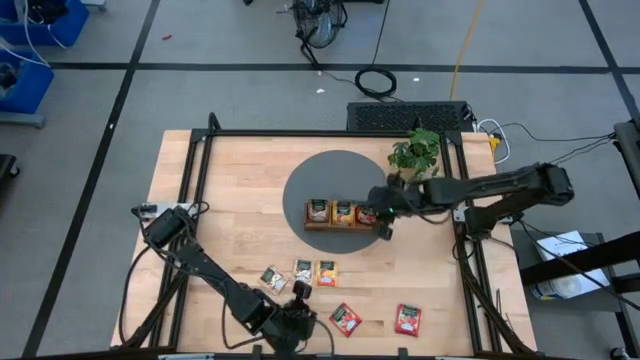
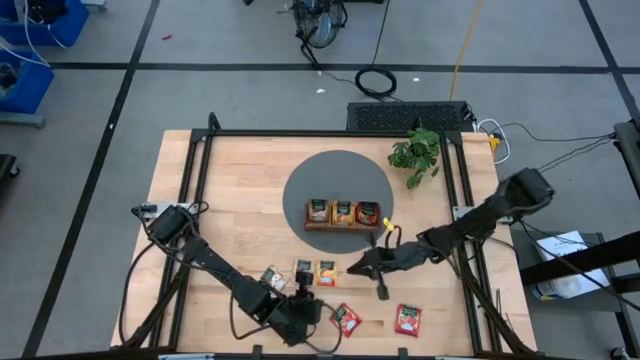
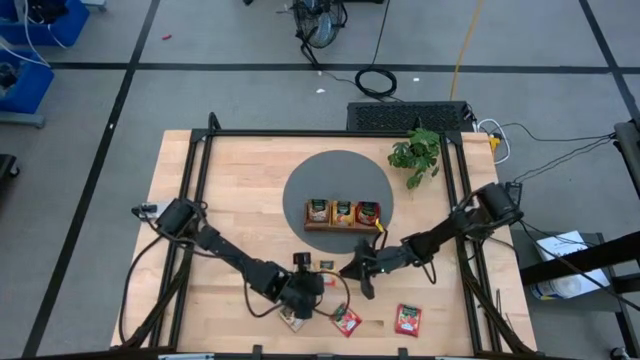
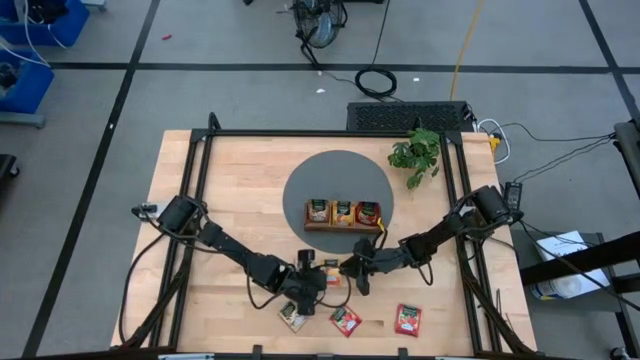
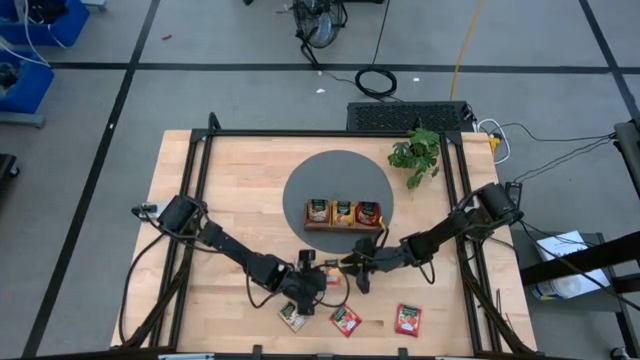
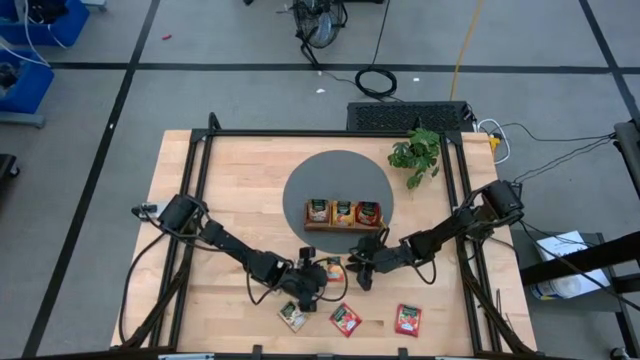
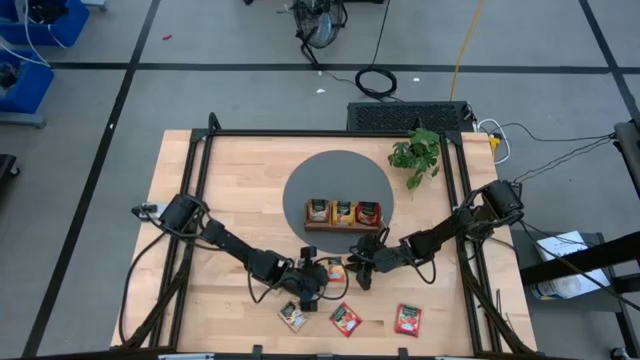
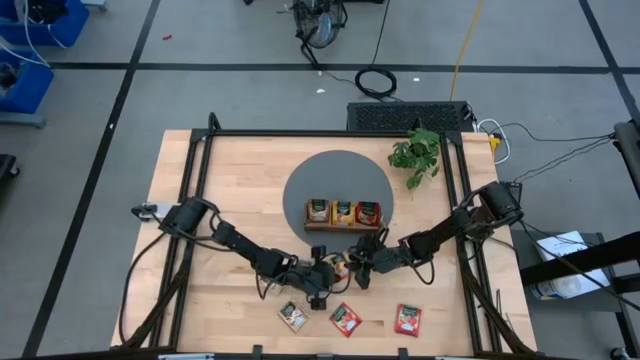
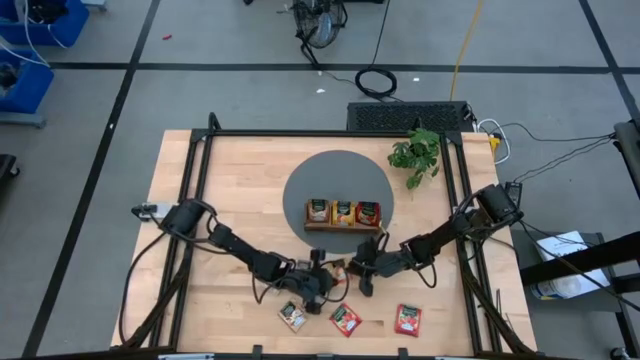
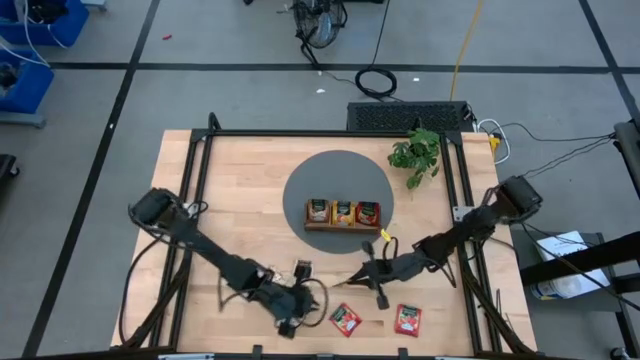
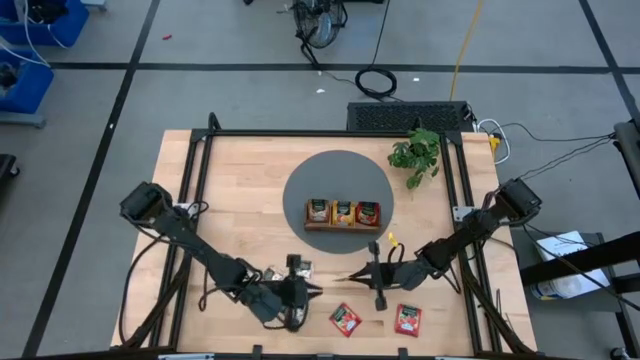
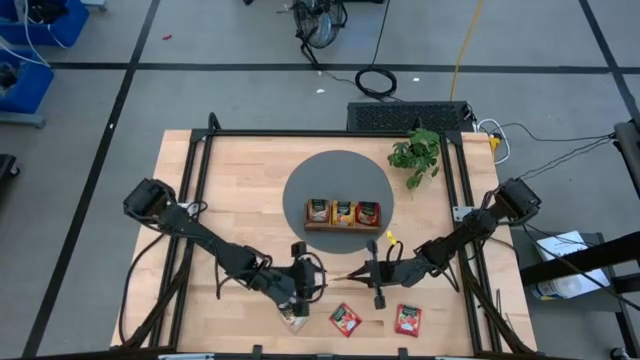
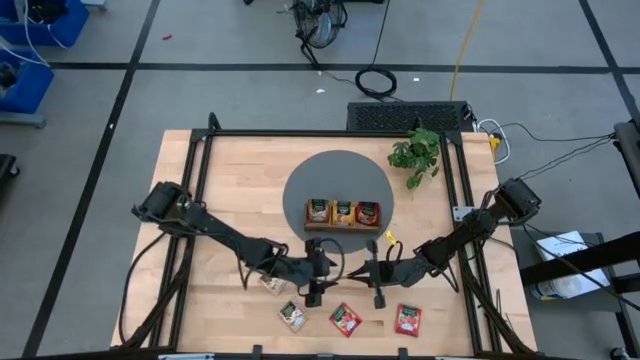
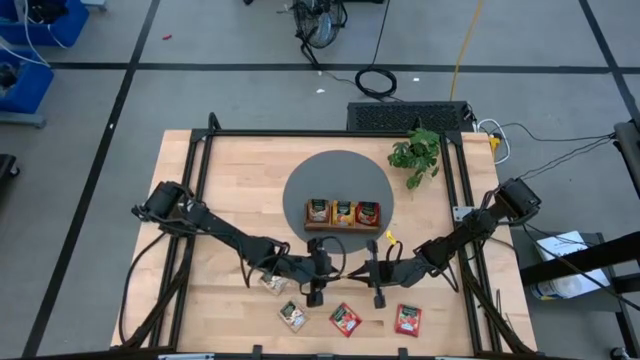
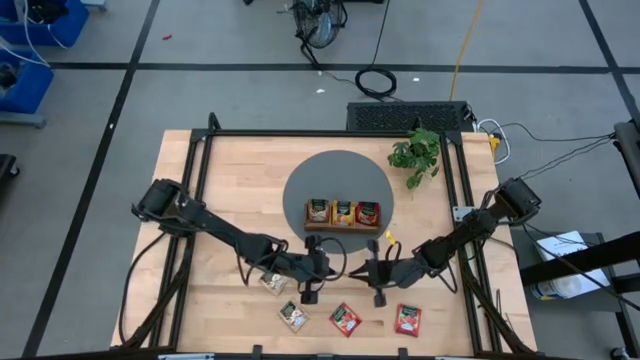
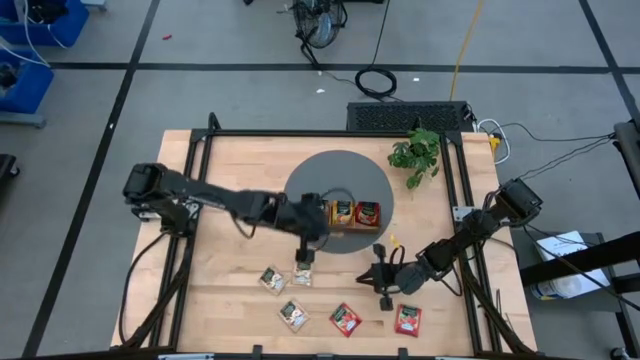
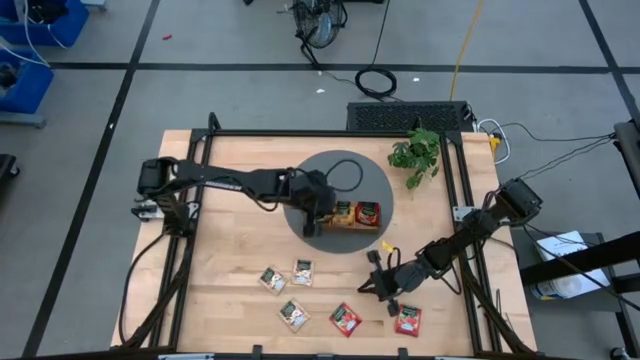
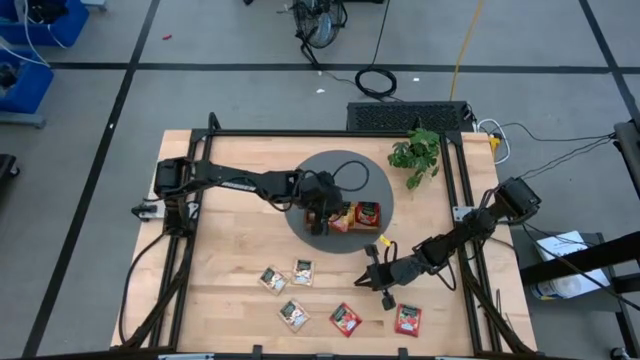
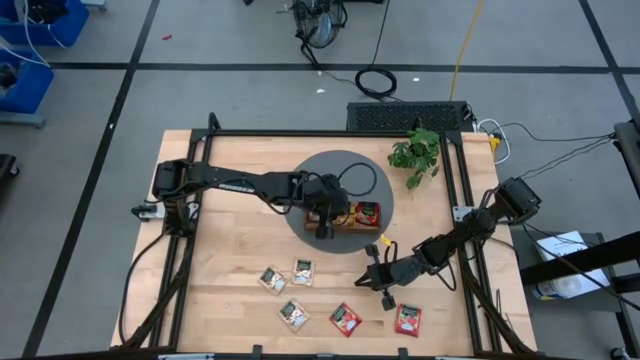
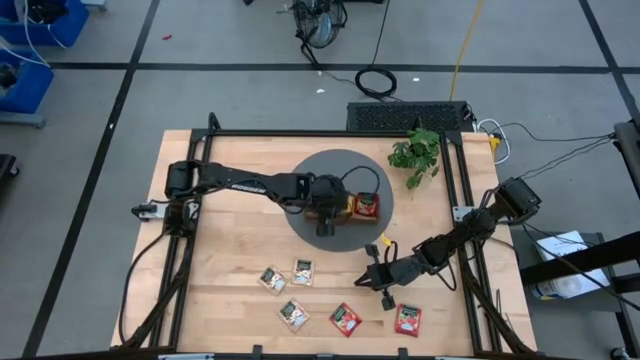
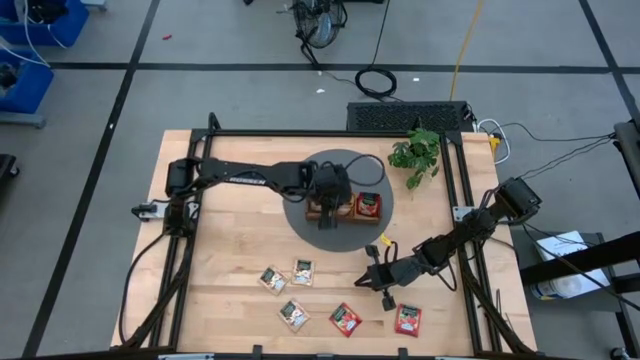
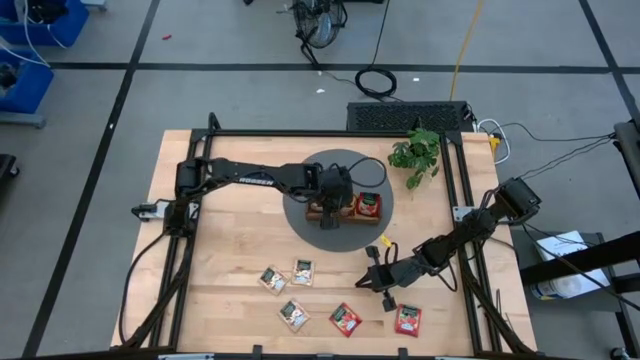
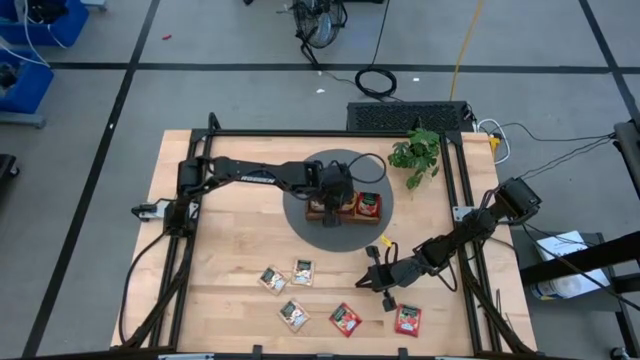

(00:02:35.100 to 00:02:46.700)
Task: Pick & Place Tea
Put the orange tea bag into the middle slot of the wooden organizer

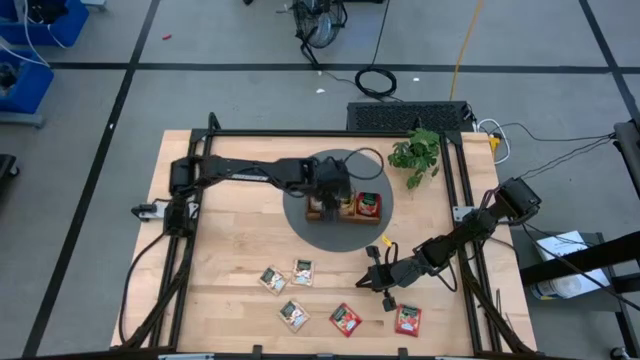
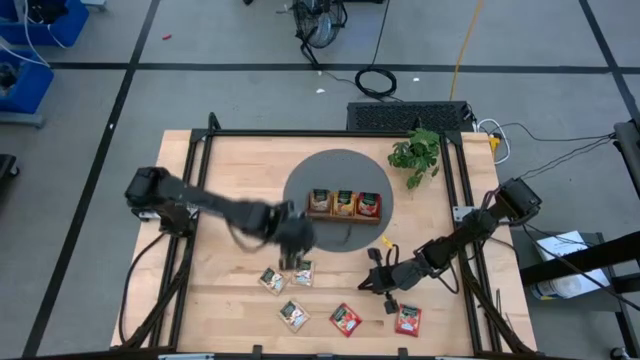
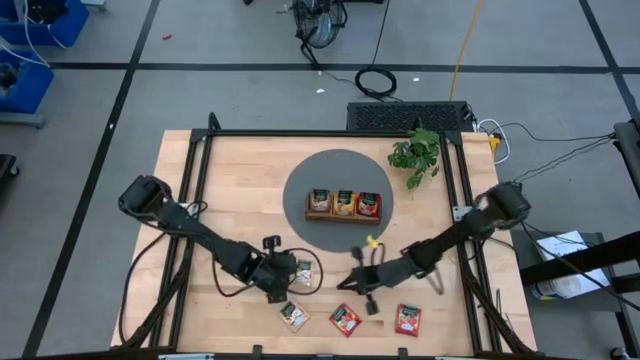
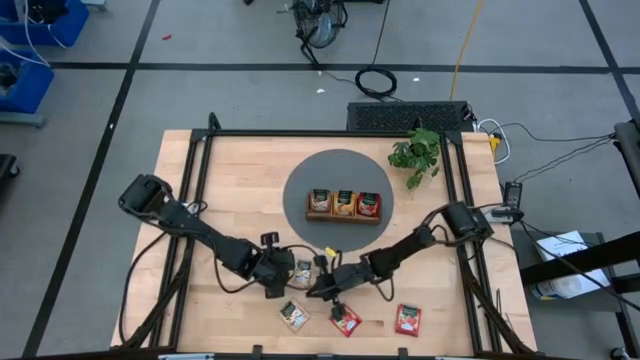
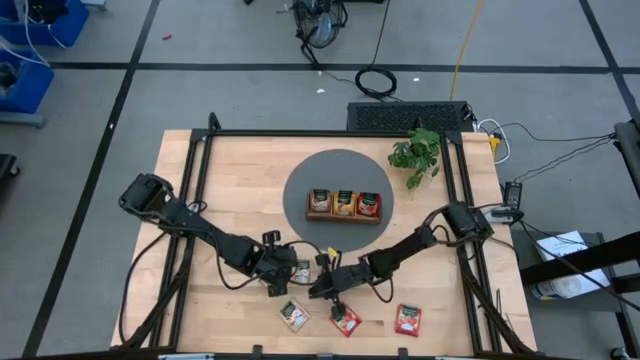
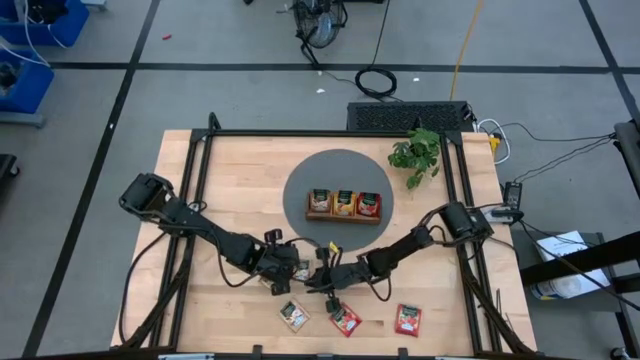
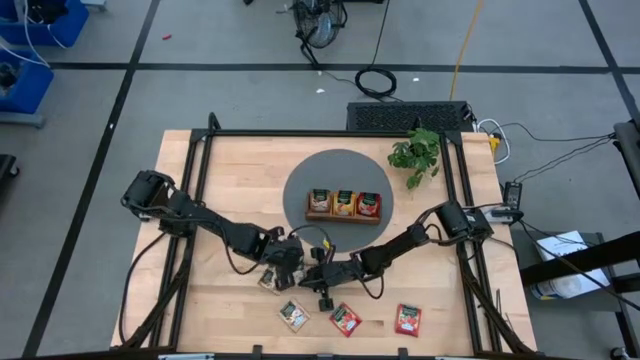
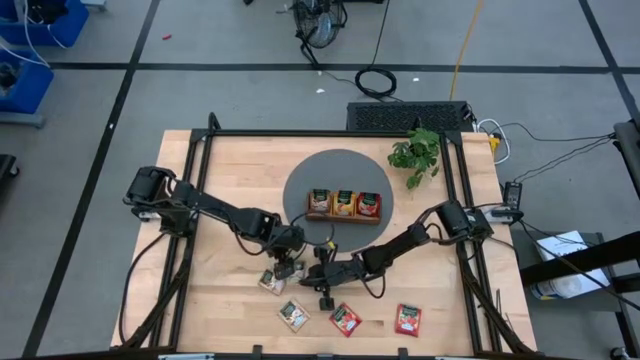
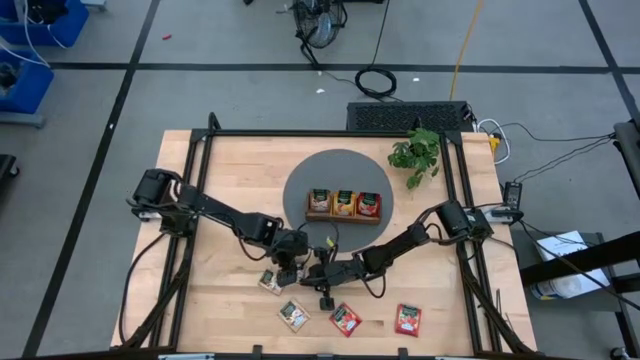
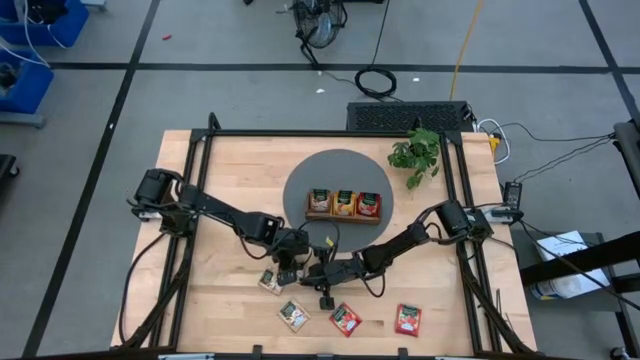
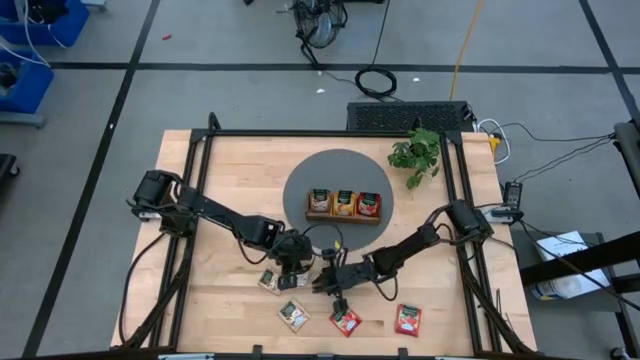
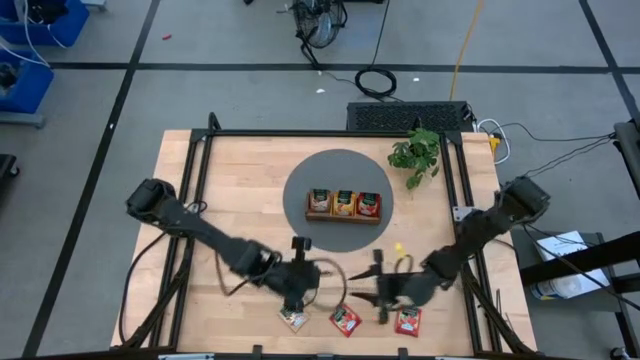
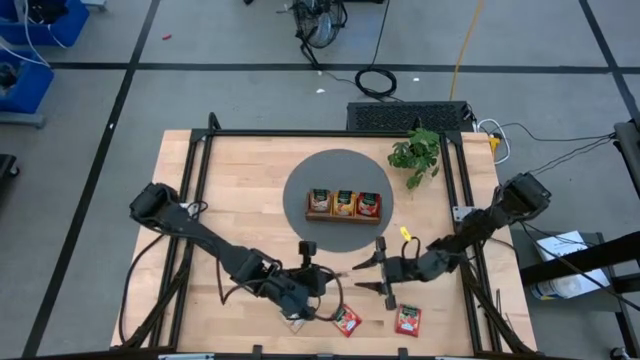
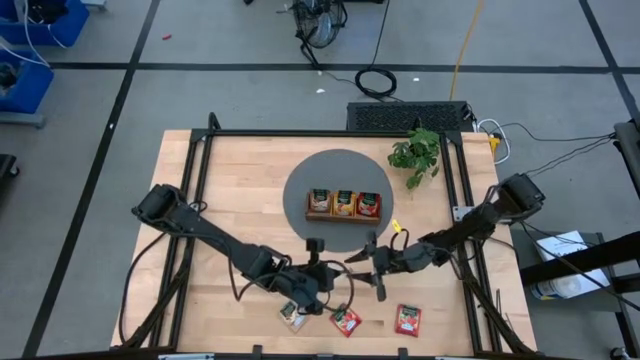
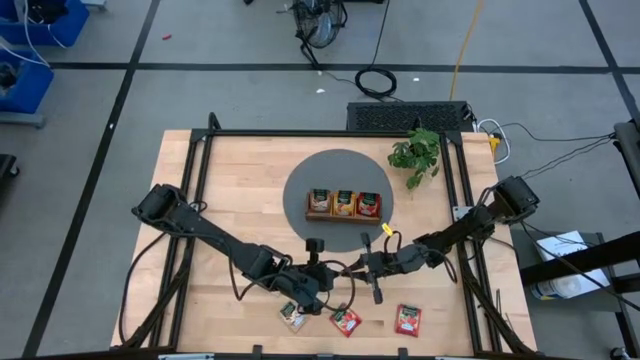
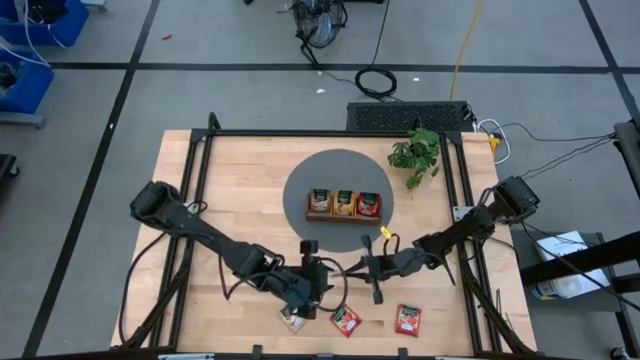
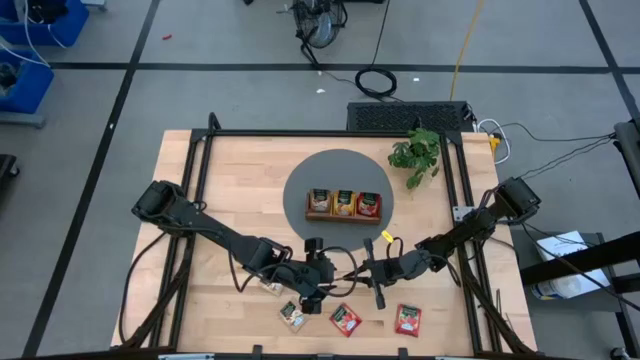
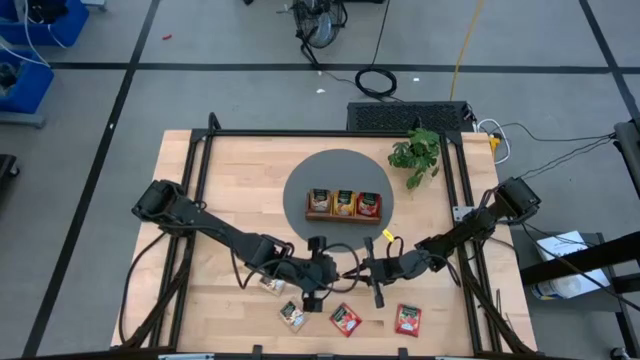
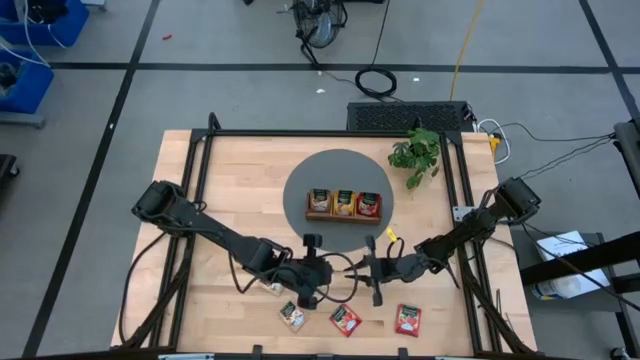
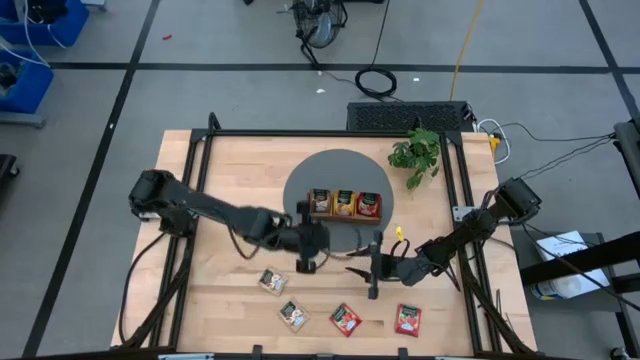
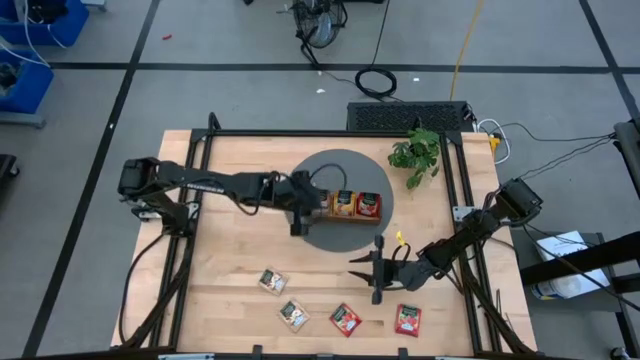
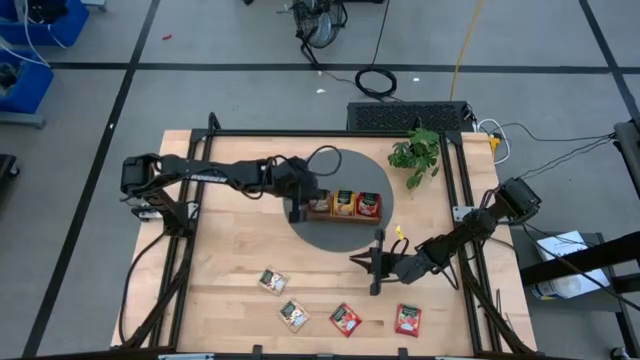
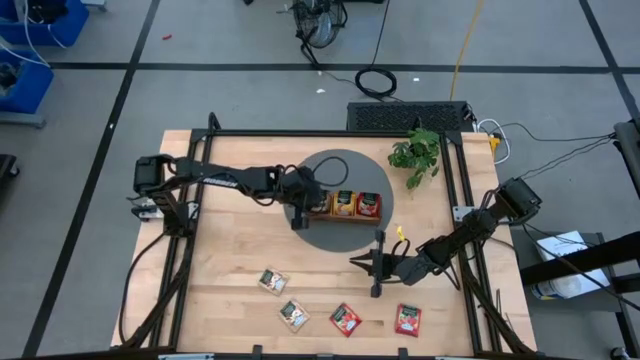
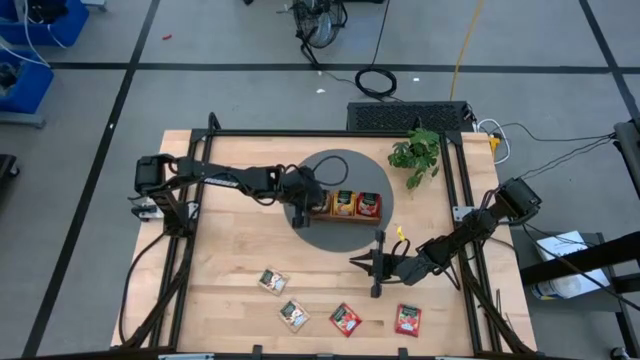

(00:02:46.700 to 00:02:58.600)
Put the top right brown tea bag into the left slot of the wooden organizer
